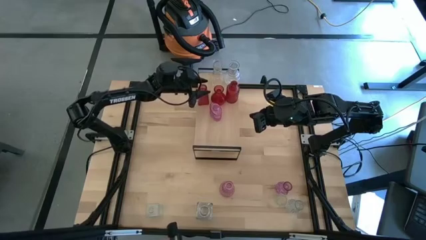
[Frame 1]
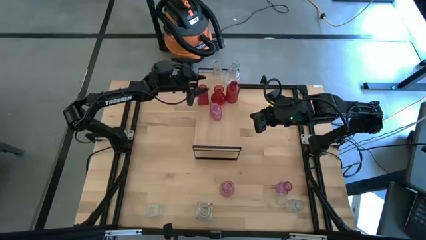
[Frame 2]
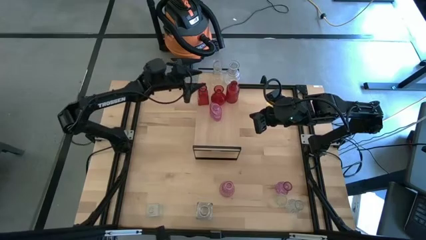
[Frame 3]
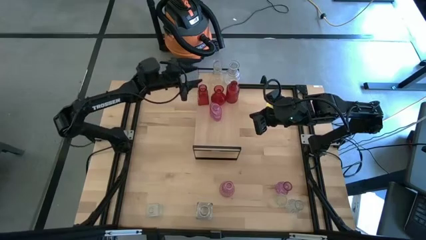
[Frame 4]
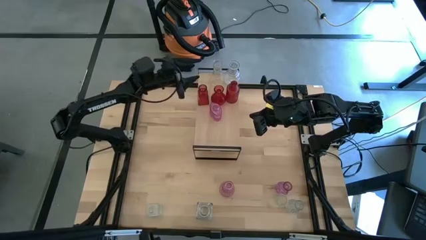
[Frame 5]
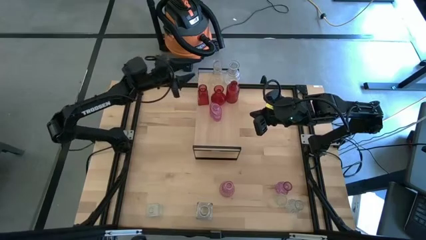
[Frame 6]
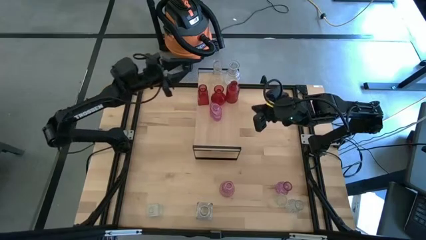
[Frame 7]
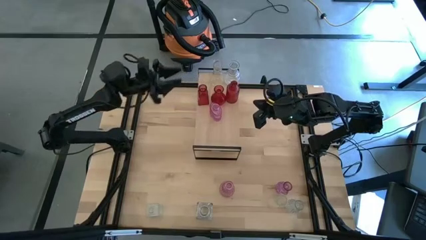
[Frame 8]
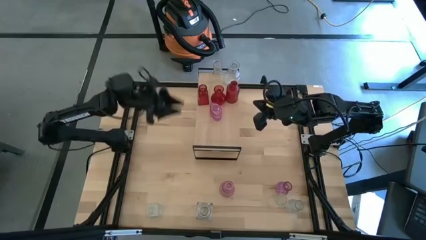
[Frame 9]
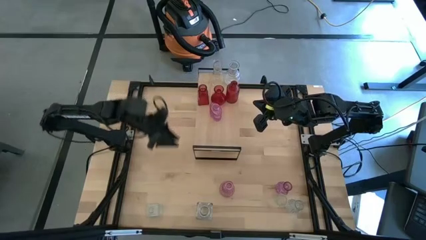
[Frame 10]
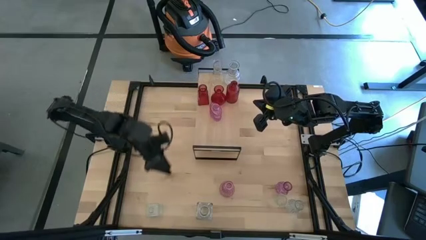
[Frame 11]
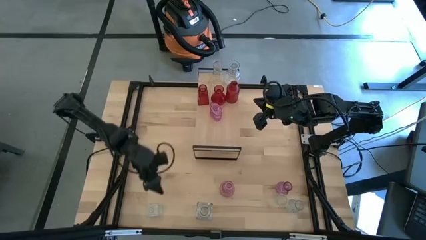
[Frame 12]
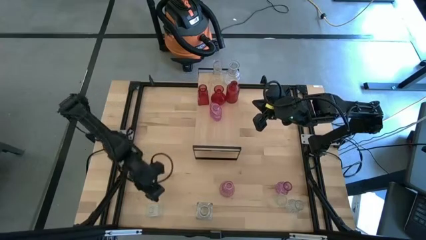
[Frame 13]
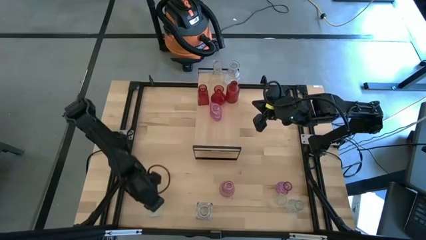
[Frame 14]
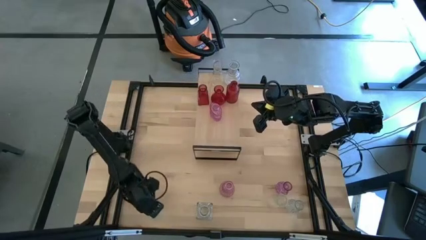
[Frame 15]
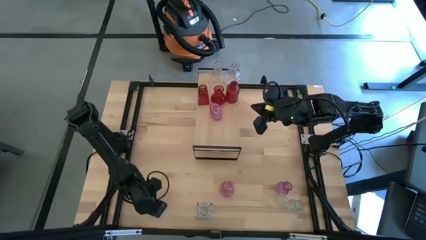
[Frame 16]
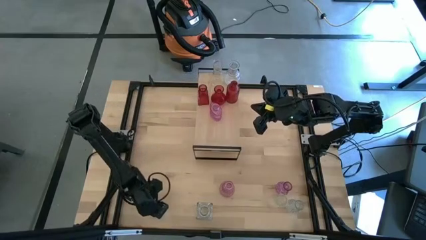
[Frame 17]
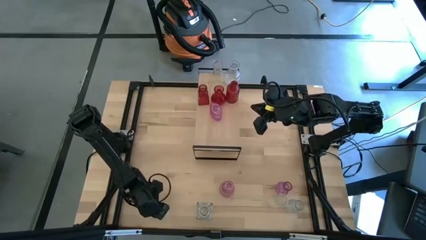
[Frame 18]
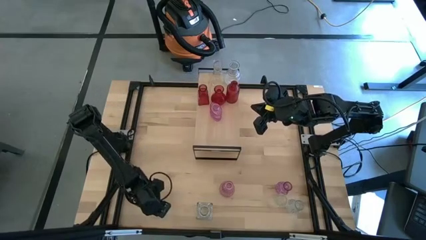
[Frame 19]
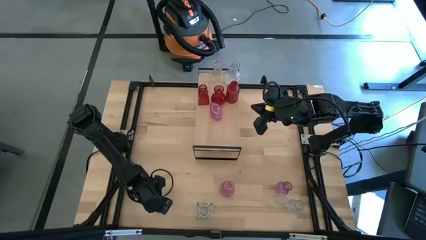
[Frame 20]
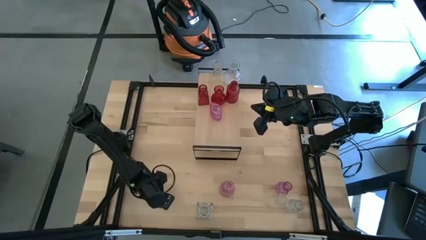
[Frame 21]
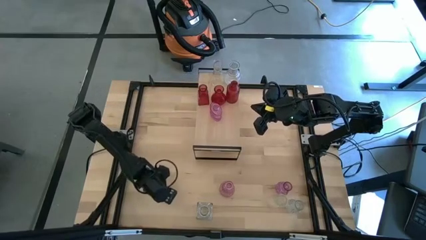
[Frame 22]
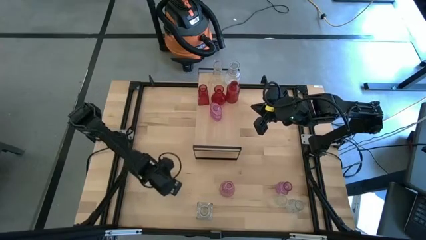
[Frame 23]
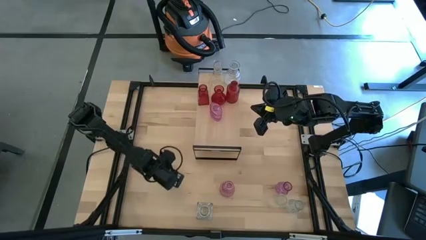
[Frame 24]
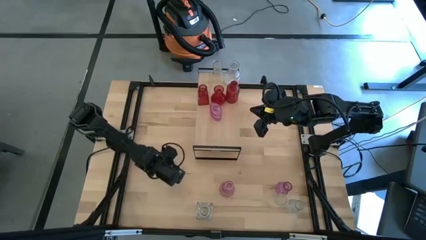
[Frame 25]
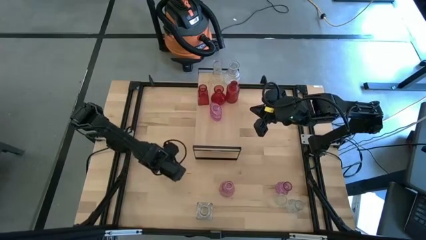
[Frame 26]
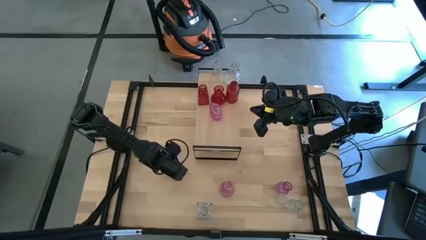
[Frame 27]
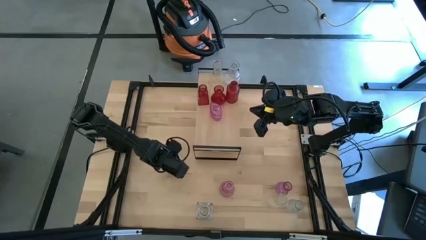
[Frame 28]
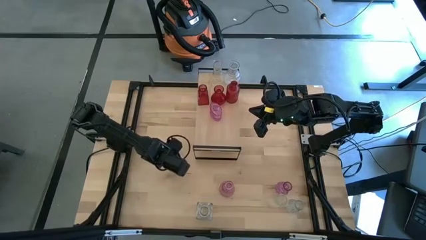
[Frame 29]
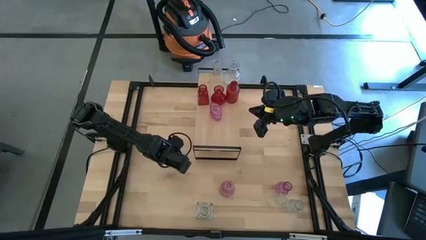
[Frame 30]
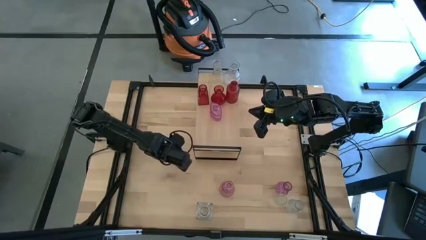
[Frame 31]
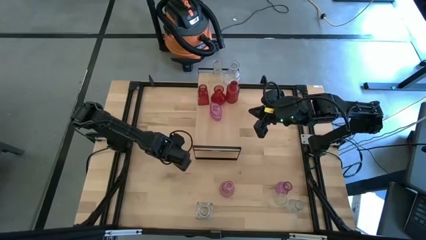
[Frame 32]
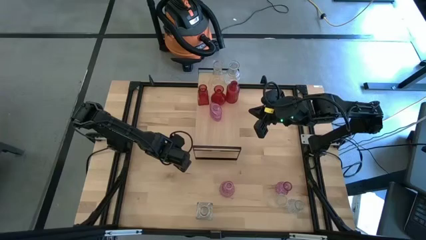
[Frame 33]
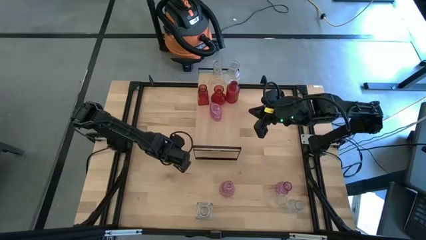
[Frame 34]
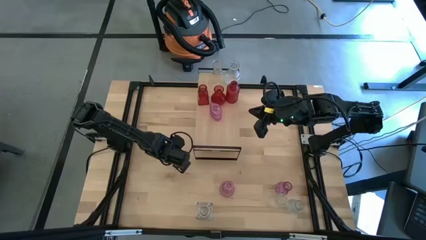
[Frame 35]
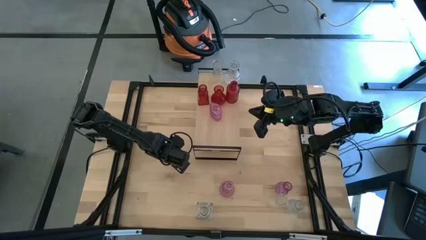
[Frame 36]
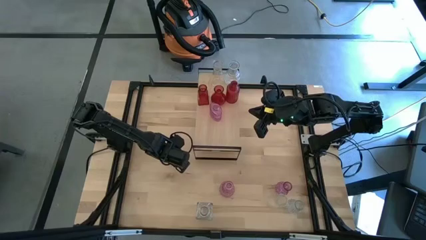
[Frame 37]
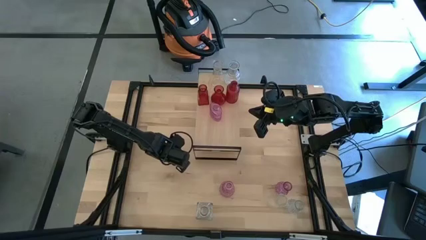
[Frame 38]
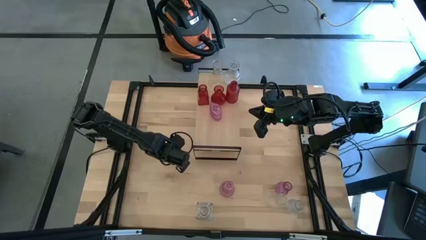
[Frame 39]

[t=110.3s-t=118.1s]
Task: sort vases onto shelf
Put the transparent vase on the shelf aligned with the other transparent vases

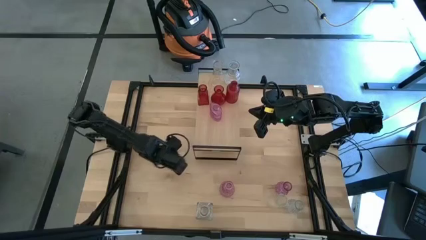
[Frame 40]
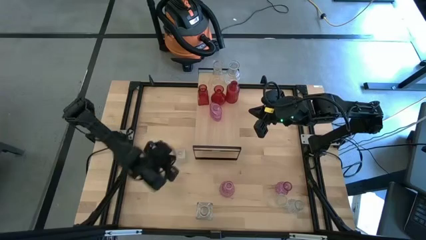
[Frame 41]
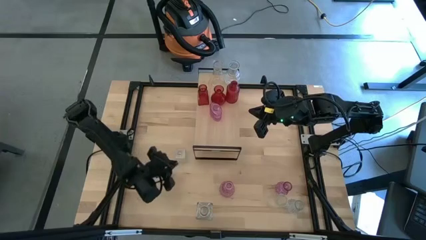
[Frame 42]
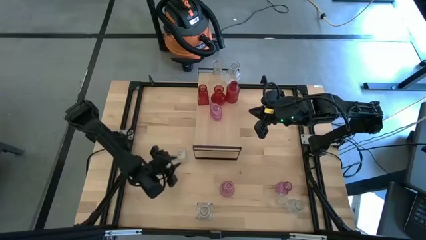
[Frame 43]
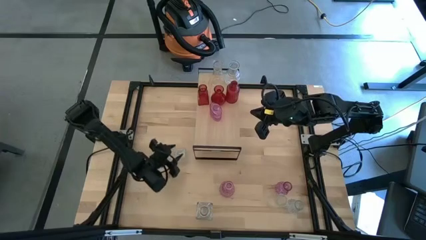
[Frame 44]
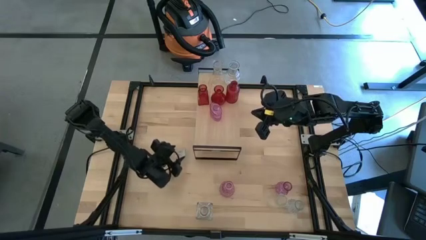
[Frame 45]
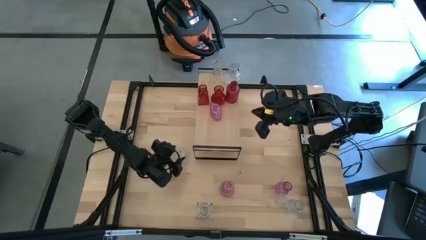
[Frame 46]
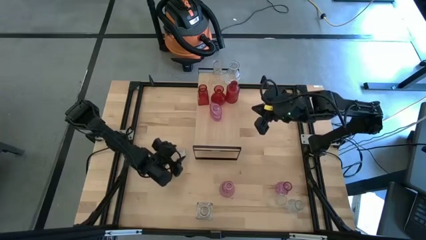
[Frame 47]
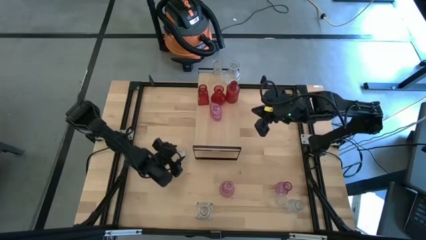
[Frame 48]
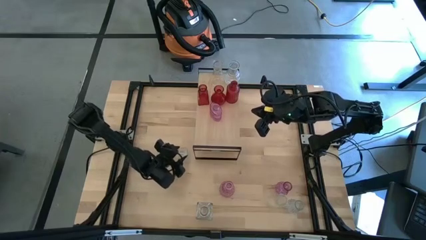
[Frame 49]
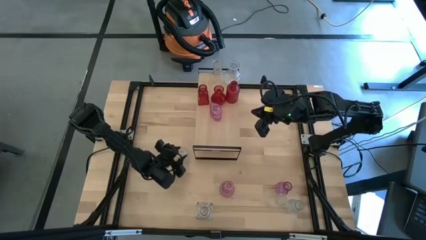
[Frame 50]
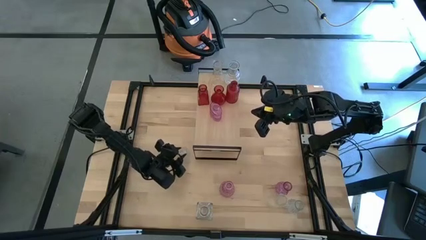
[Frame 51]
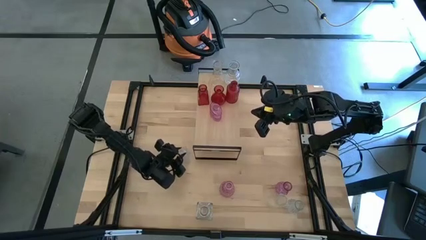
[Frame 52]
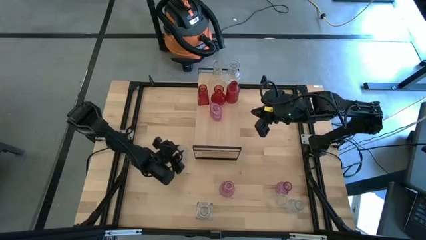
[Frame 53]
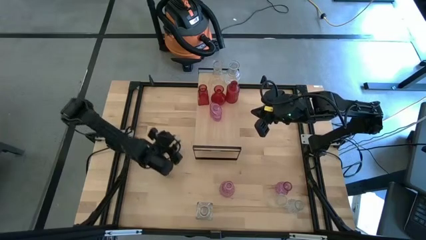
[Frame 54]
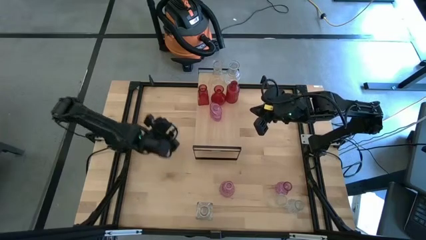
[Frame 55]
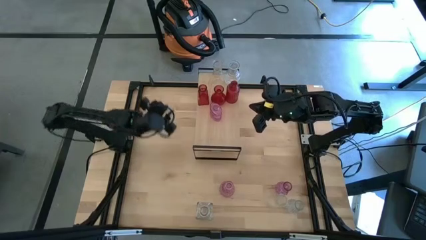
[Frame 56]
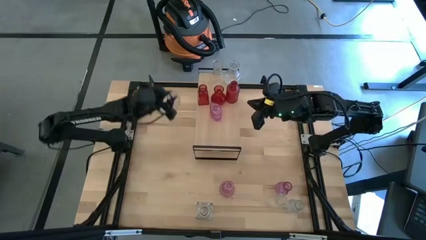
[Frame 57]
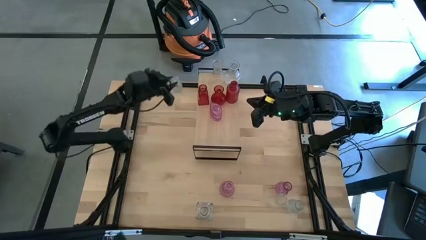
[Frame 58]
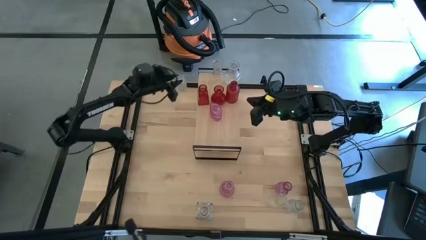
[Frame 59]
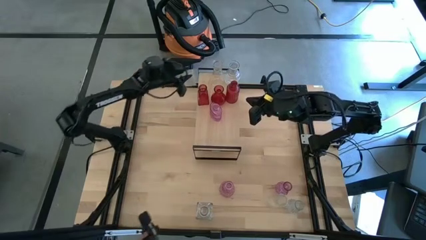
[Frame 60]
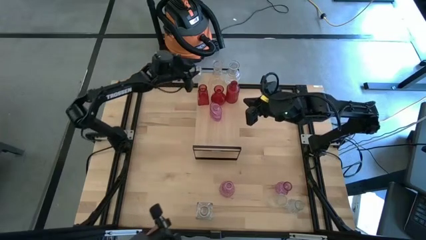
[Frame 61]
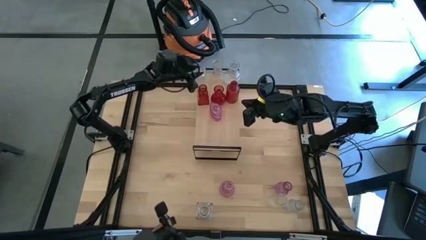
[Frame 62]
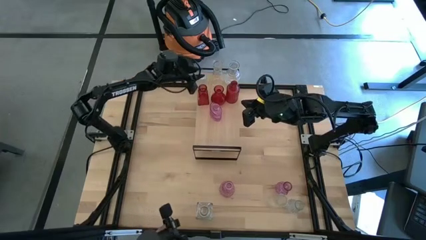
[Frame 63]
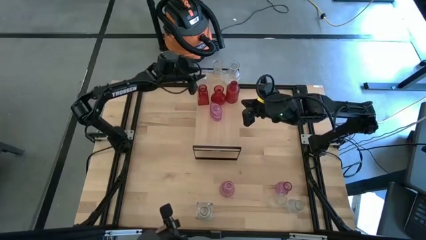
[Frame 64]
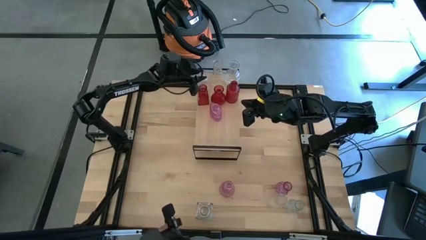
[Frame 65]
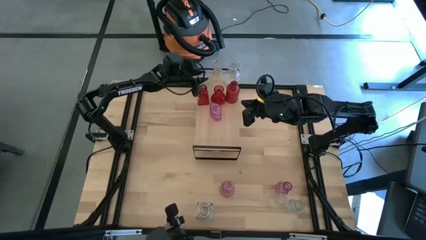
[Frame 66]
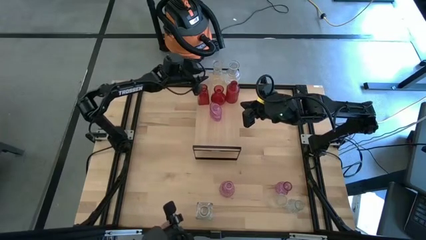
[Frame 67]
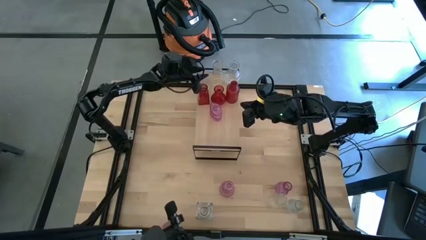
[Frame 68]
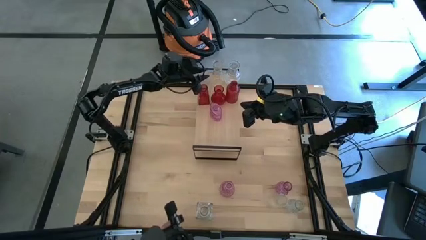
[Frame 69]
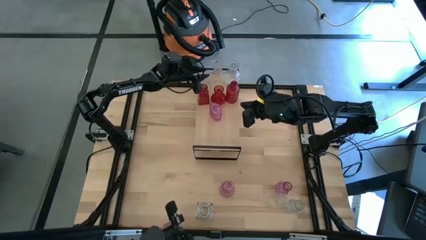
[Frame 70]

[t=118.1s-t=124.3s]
Put the transparent vase on the shelf aligned with the other transparent vases

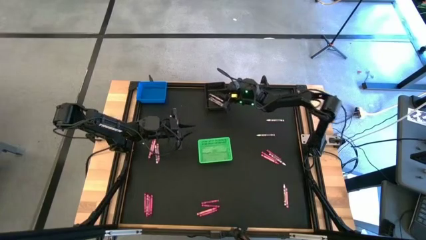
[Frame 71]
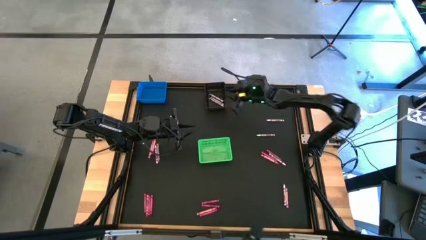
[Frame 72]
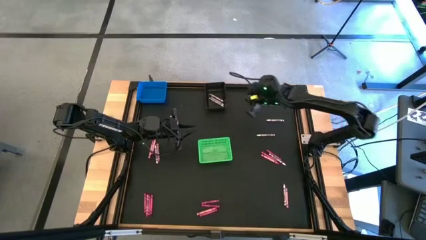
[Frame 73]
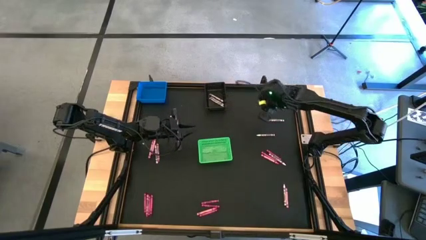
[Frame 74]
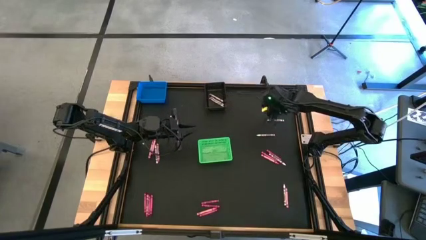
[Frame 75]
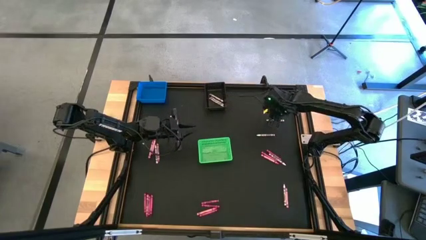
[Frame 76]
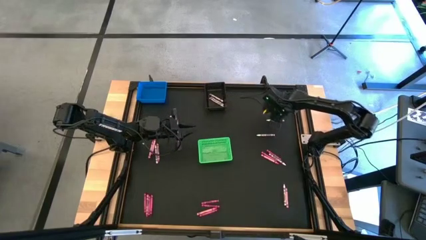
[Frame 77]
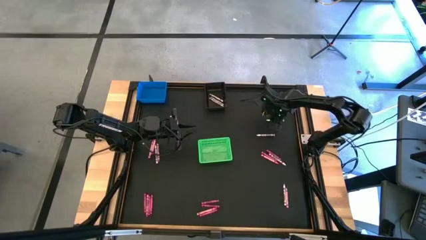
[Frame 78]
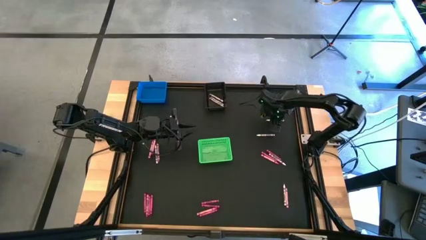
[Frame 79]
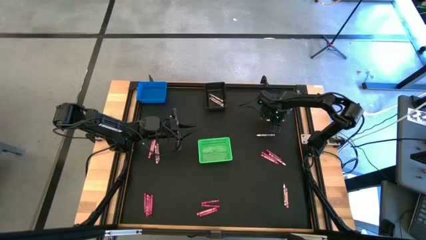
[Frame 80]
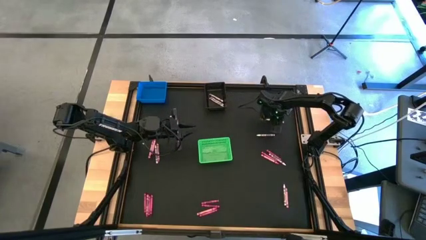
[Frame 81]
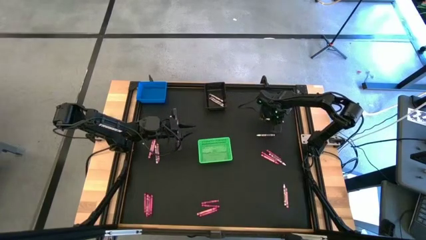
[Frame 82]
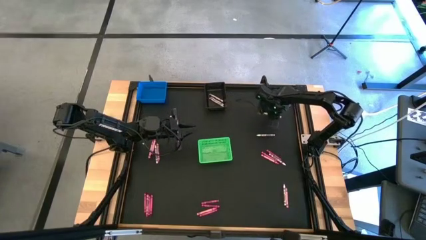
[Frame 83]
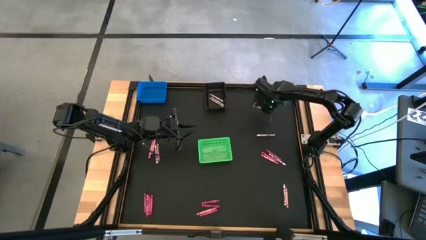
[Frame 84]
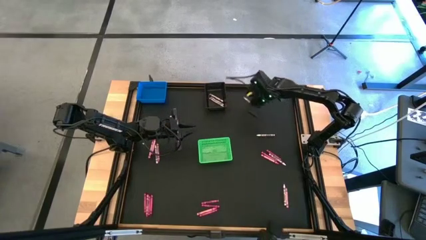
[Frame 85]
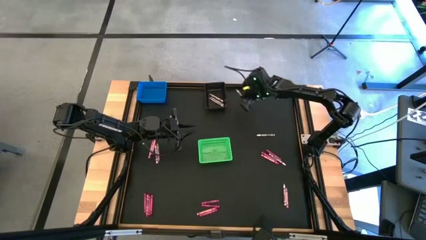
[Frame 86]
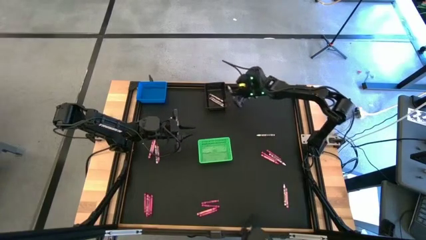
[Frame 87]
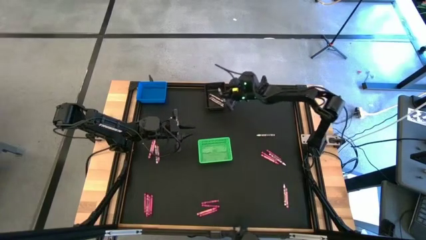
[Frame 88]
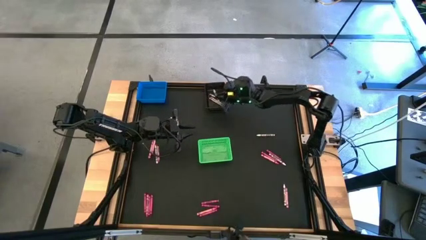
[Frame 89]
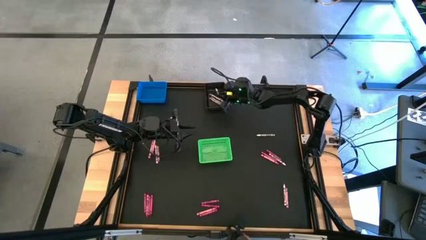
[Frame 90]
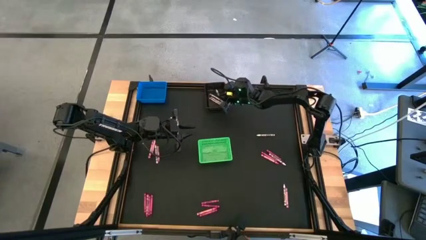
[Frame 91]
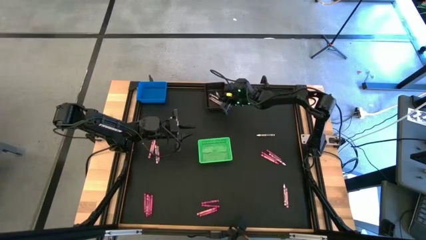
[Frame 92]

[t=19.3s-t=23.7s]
Task: Sort crayons
Put the white crayon into the black bin
